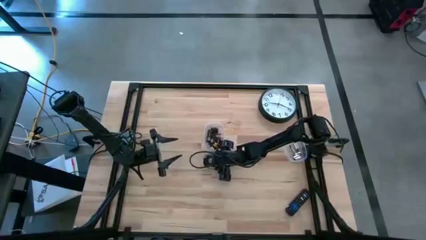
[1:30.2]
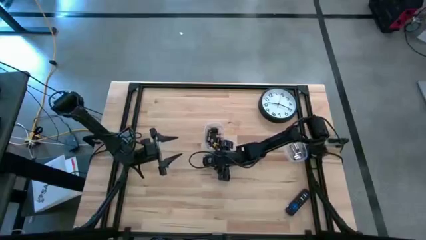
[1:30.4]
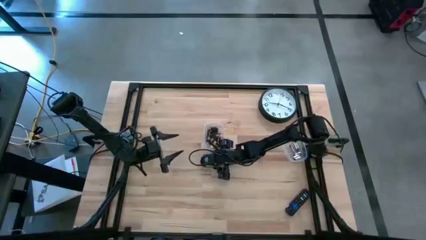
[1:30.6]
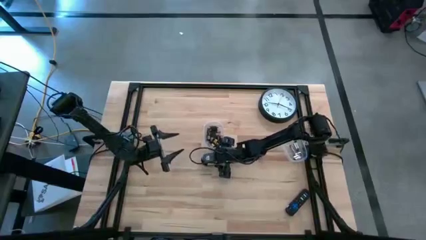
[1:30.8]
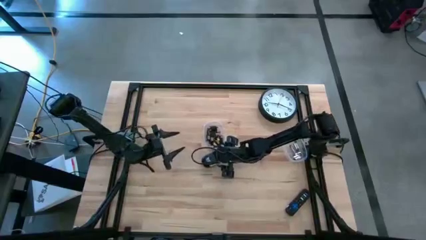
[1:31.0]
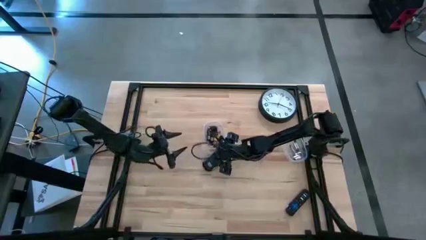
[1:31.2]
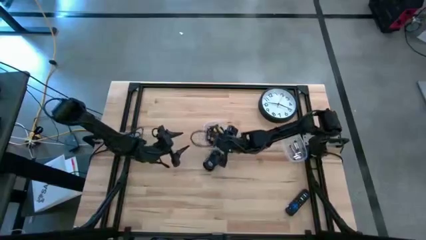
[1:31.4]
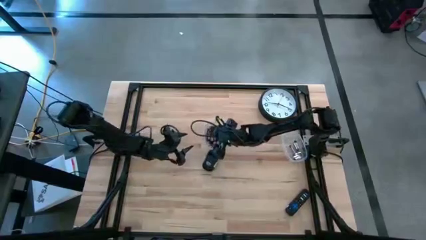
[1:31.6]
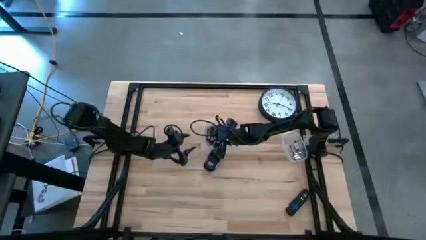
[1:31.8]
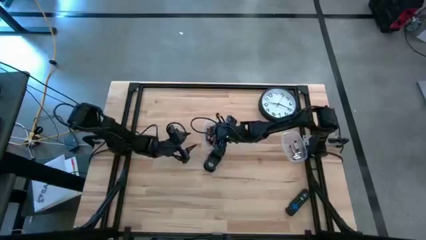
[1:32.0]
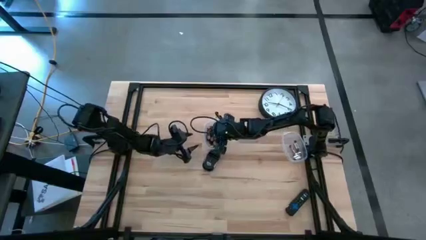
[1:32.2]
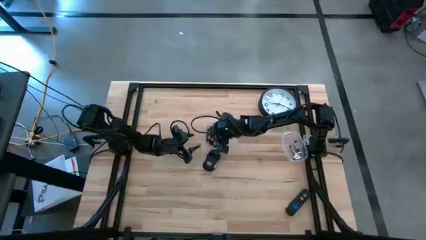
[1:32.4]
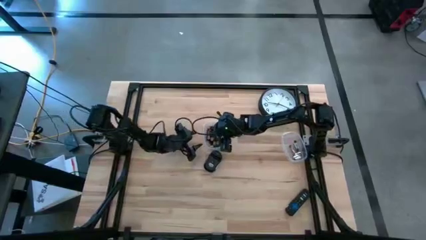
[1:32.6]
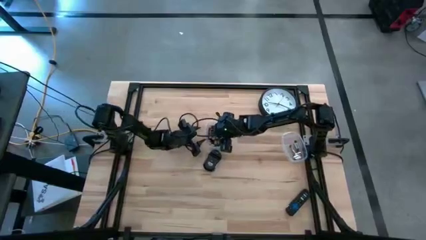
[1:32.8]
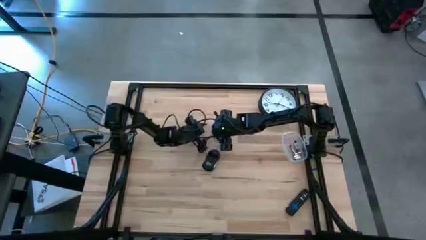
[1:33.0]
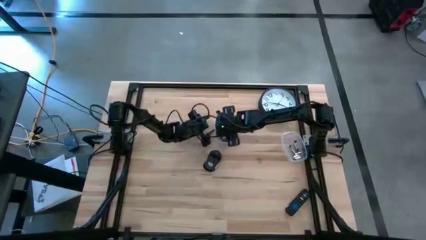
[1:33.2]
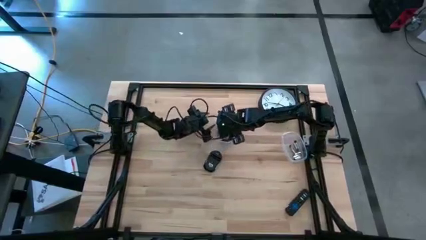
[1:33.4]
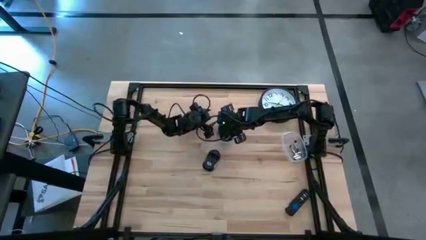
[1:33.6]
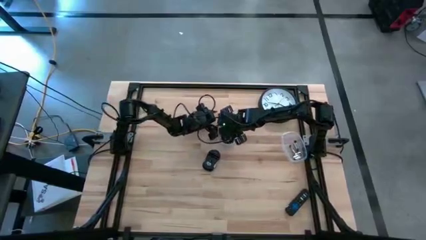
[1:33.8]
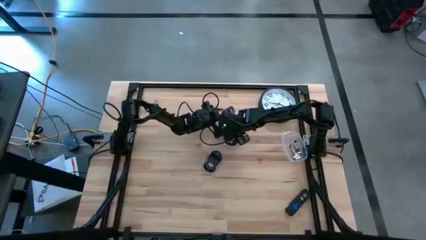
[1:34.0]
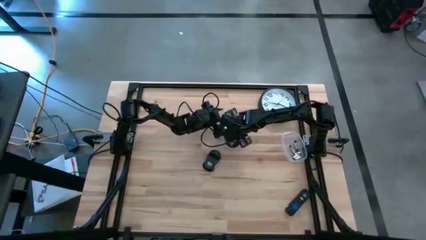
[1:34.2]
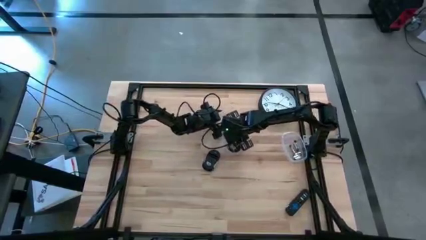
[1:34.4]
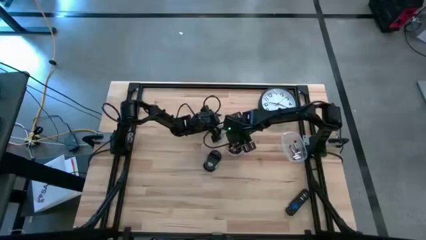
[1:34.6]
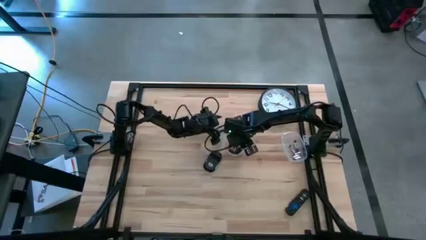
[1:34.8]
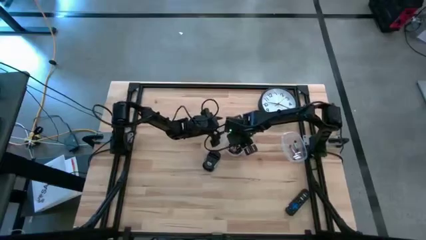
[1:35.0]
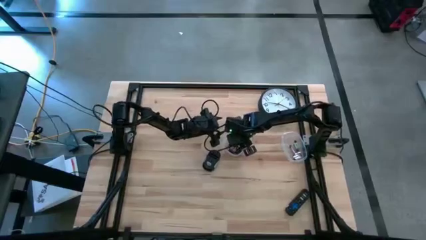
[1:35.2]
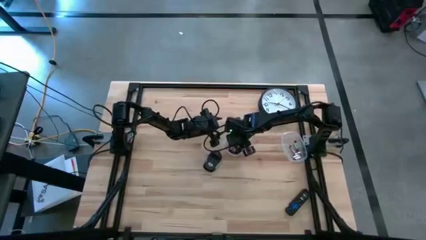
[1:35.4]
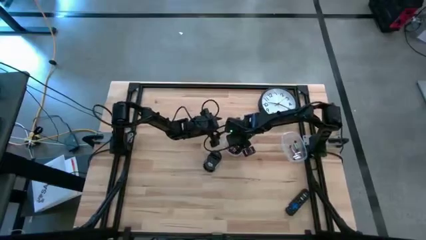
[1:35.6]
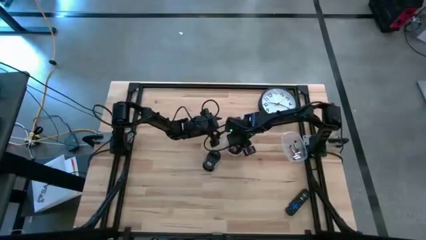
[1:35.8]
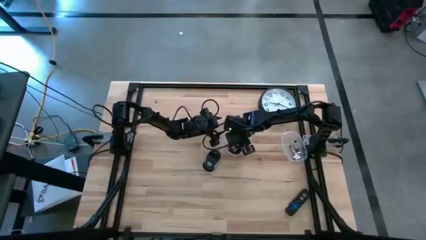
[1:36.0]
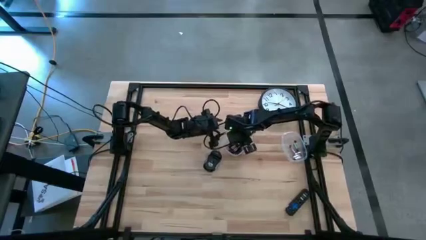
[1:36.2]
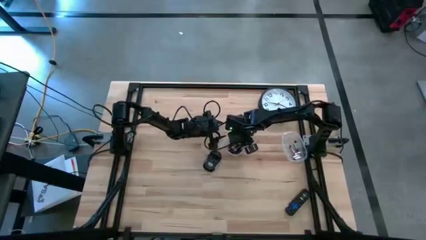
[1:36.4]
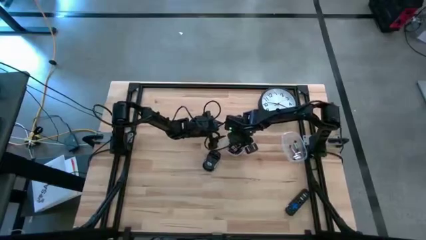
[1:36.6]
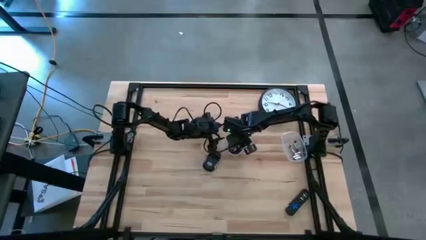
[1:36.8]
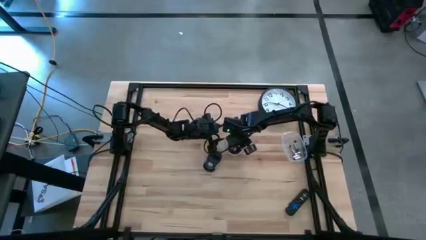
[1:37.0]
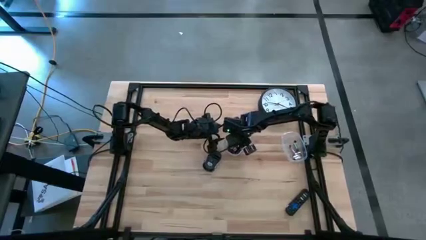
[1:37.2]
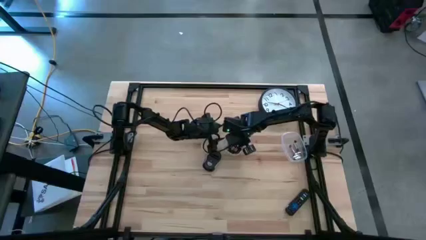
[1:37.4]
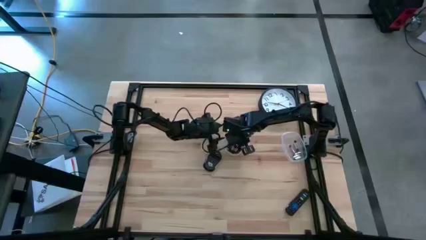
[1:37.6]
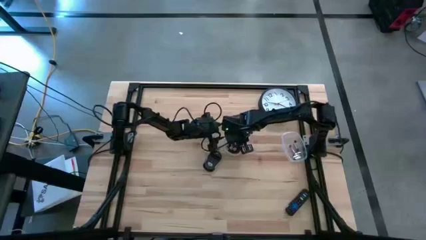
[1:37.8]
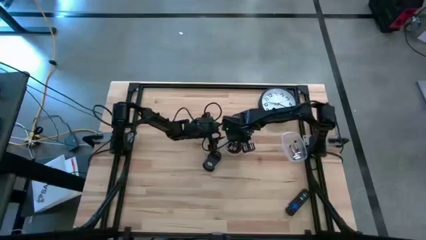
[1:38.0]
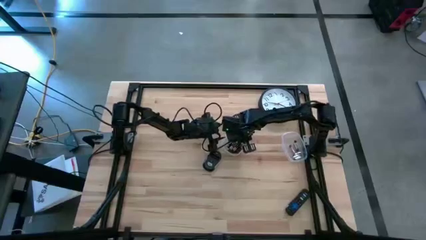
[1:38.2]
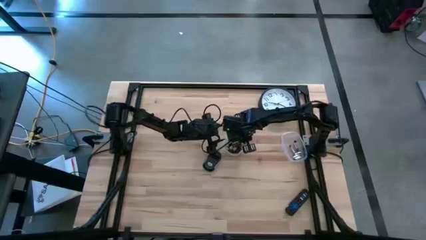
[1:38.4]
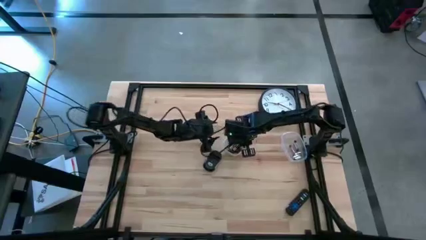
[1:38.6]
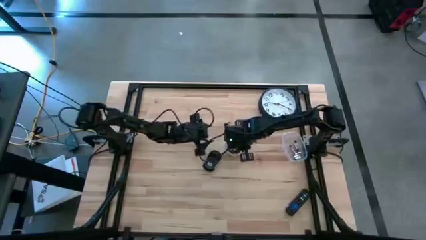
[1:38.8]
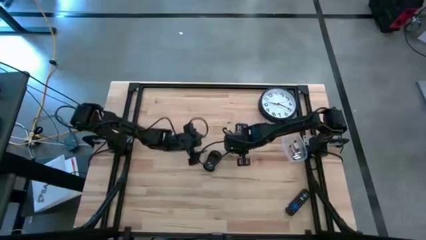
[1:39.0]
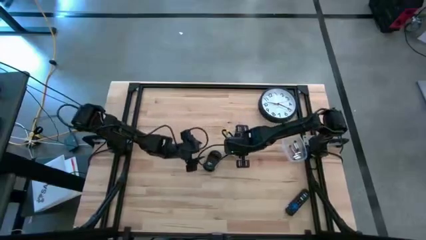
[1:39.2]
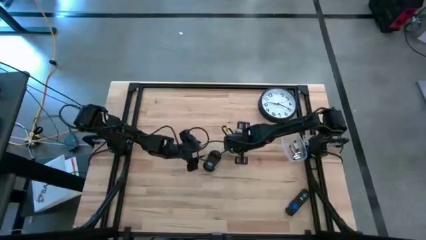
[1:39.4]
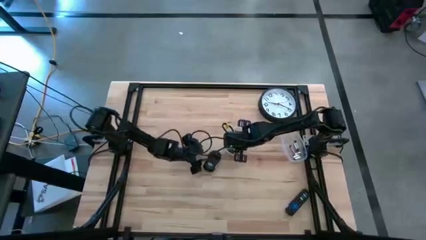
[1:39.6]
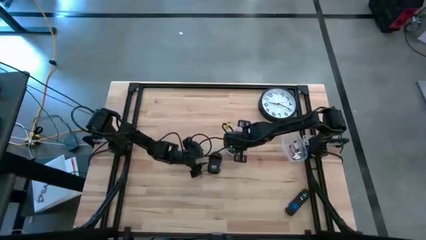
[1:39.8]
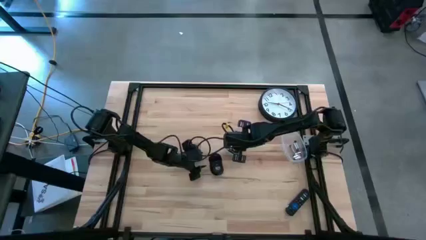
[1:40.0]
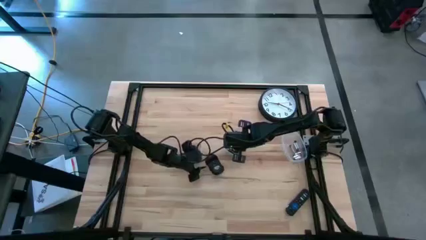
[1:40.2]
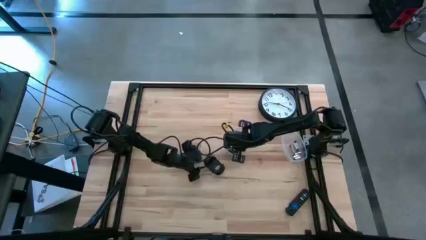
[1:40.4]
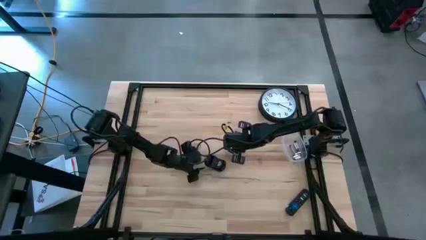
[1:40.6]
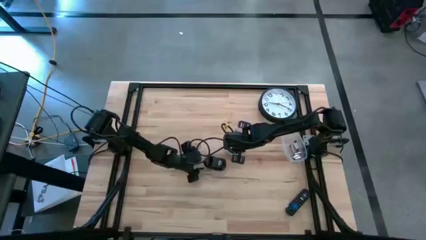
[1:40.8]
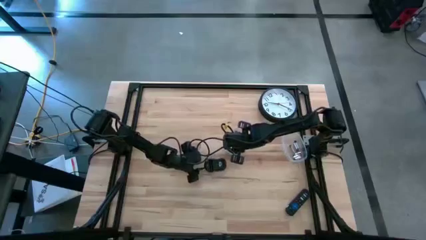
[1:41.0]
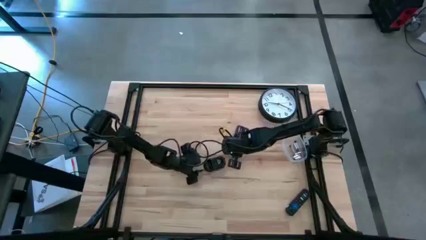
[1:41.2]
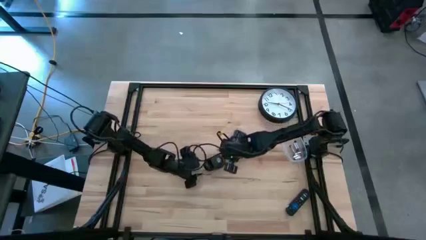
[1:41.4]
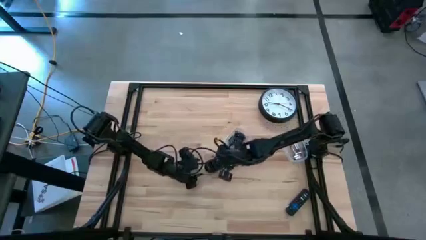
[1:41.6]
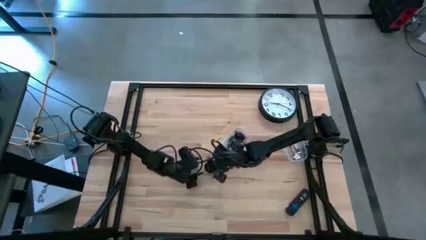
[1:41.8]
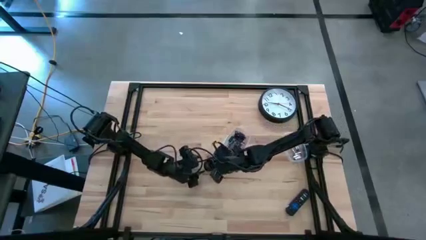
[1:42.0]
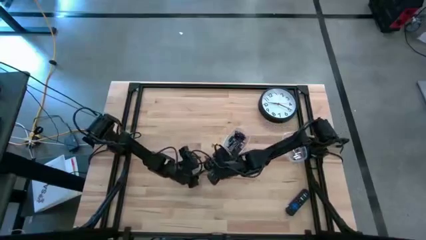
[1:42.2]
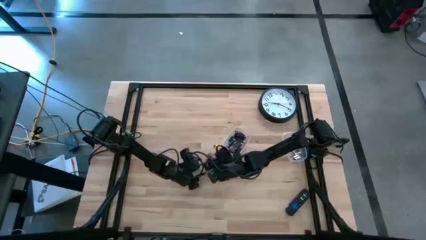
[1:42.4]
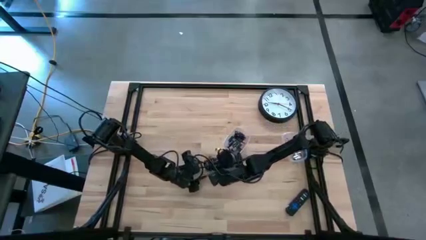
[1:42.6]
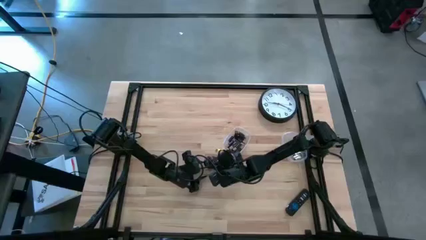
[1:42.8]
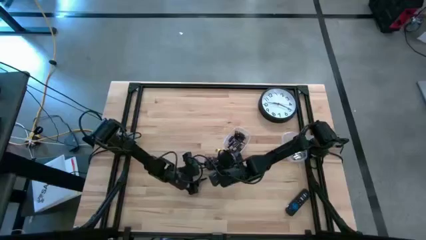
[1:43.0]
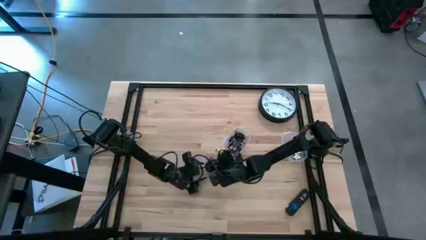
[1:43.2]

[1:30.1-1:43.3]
Task: Insert battery
Insert the brown battery into the mouse's battery compartment

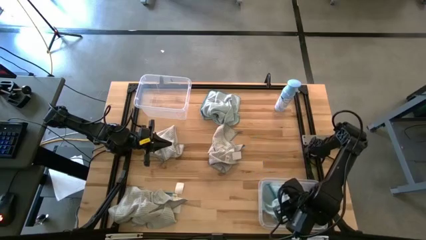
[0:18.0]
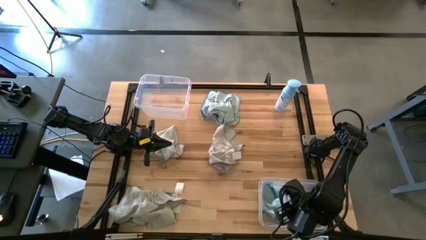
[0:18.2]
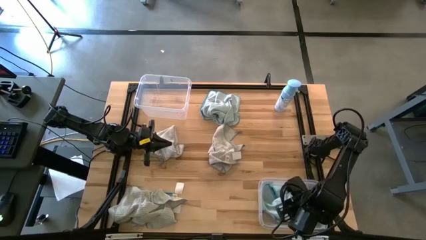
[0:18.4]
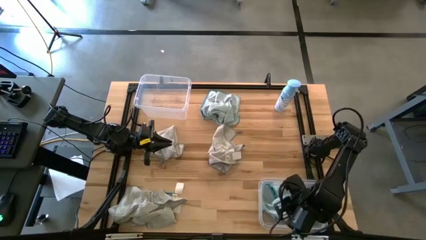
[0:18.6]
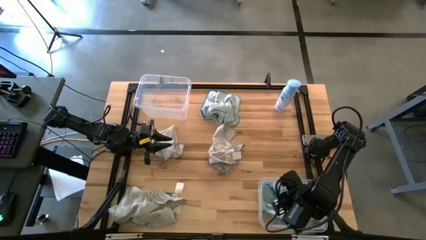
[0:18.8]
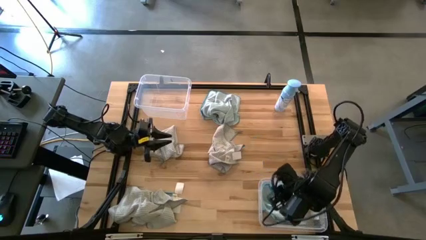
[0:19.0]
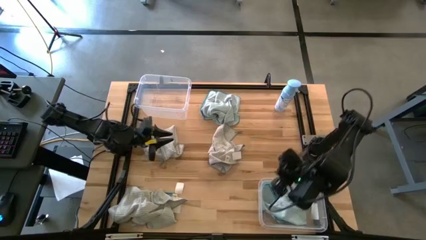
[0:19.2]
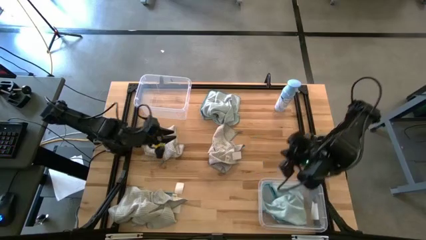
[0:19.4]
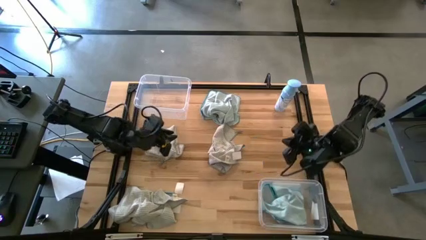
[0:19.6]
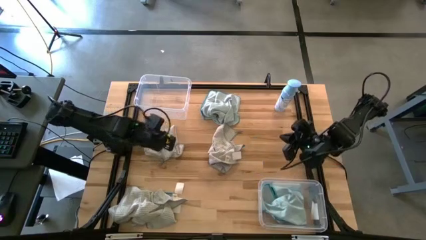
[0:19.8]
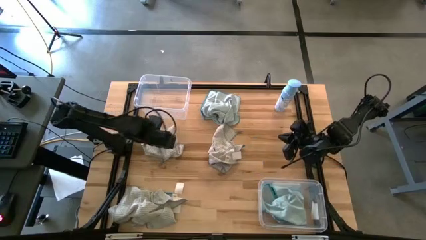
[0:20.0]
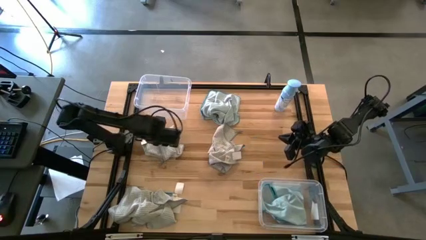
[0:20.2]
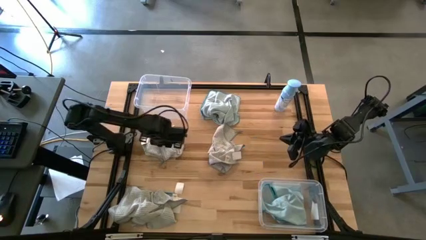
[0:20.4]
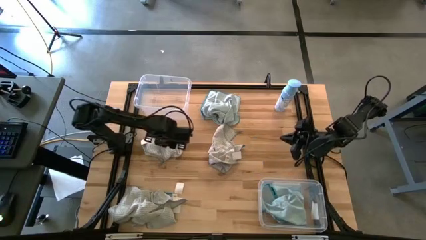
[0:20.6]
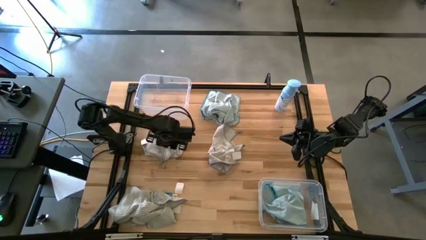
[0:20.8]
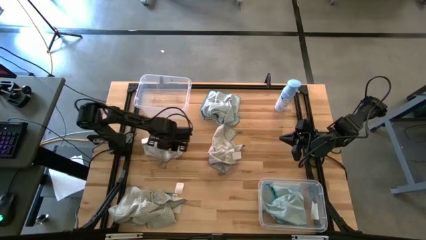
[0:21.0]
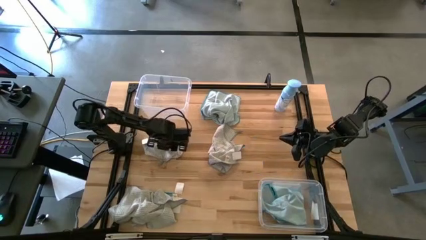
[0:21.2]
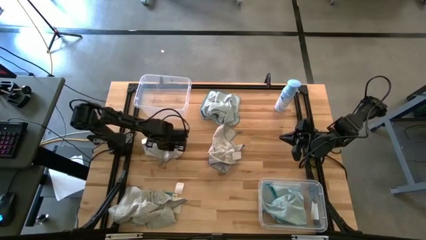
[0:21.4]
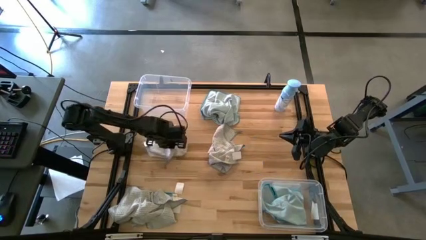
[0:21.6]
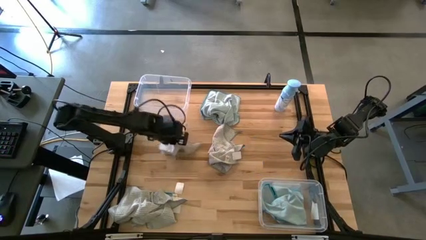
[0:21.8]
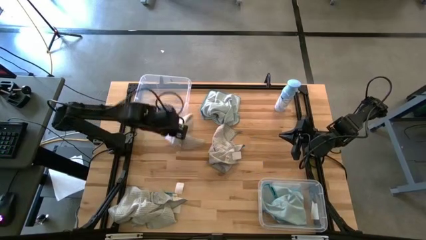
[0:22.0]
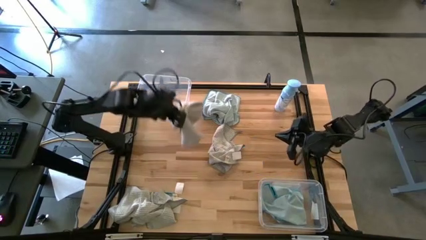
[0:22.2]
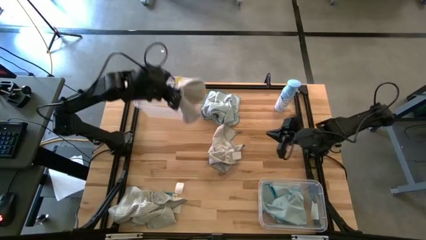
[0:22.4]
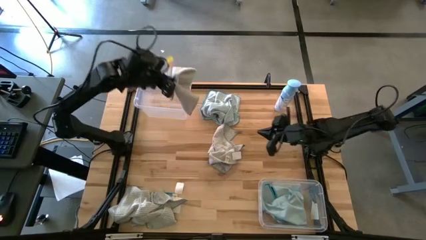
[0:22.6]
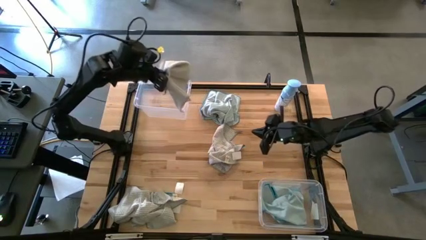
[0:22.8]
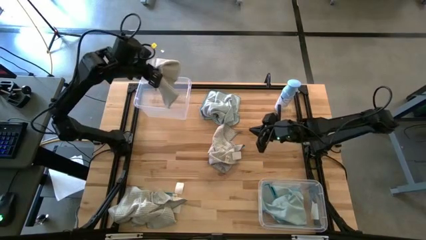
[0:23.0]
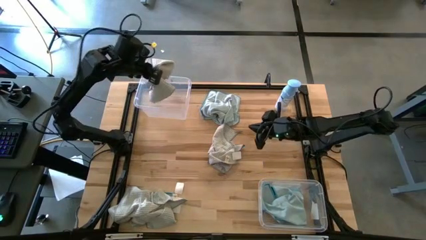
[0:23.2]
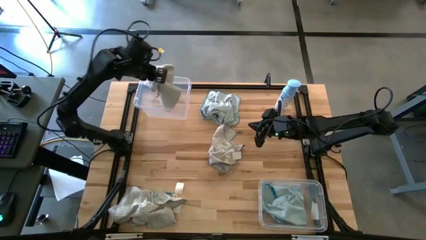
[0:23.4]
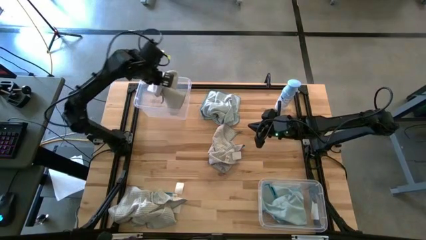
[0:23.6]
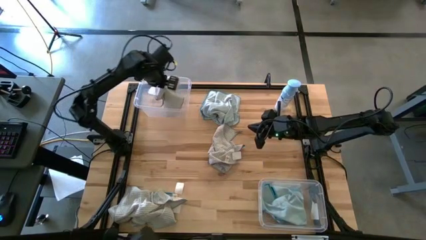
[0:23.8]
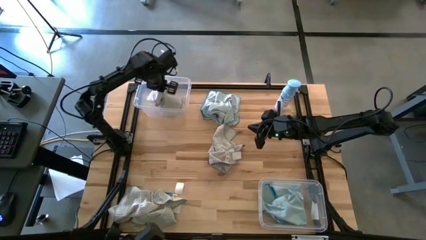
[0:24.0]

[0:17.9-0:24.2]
Task: Sort microfiber towel by color & place in baskets
Put the top left white microfiber towel into the top transparent bin
